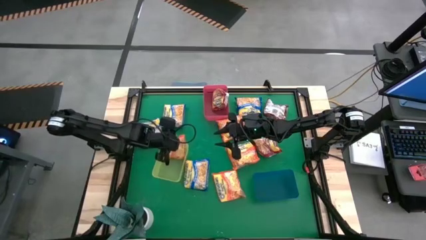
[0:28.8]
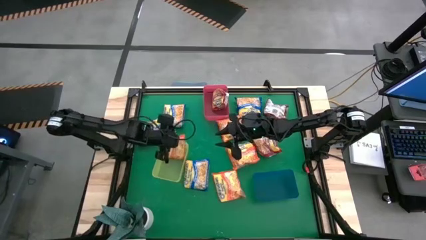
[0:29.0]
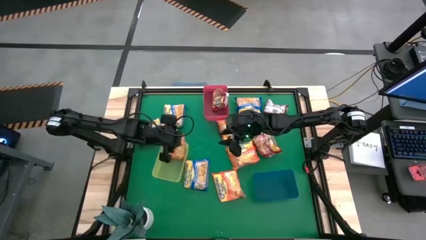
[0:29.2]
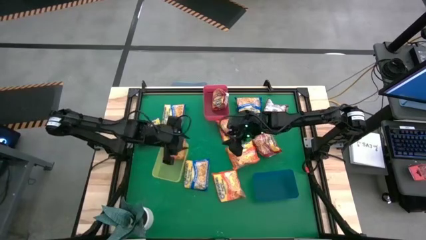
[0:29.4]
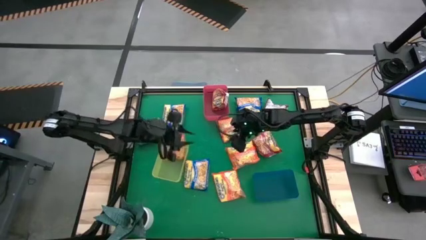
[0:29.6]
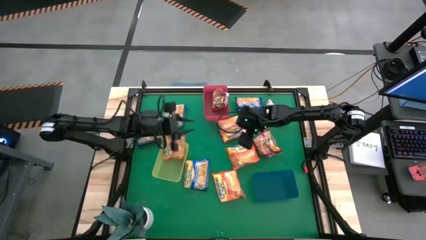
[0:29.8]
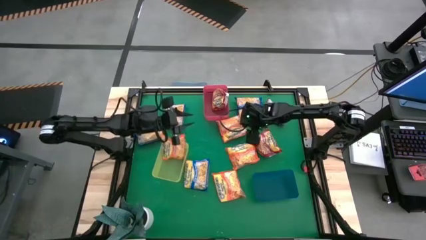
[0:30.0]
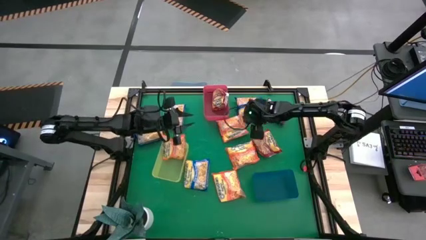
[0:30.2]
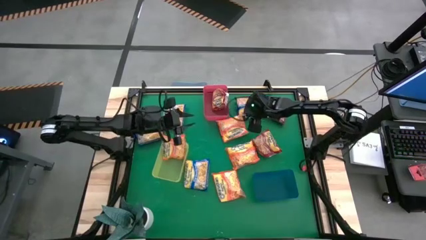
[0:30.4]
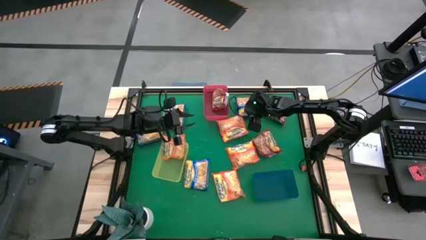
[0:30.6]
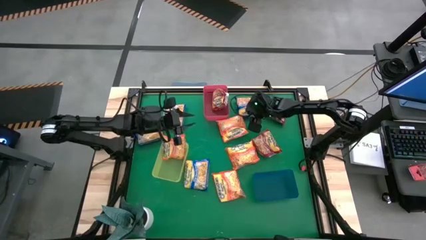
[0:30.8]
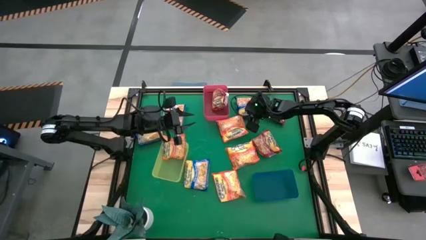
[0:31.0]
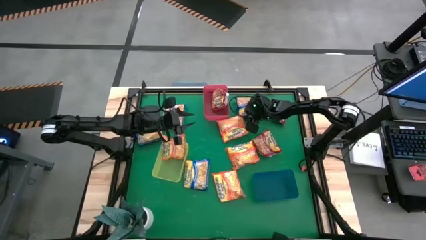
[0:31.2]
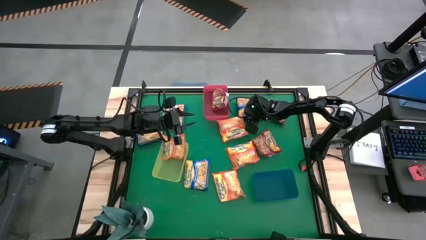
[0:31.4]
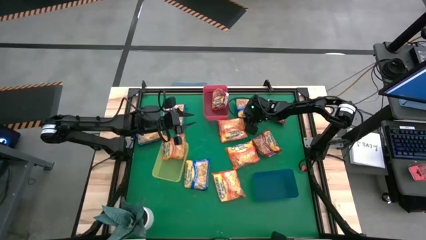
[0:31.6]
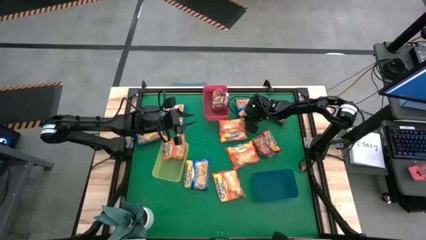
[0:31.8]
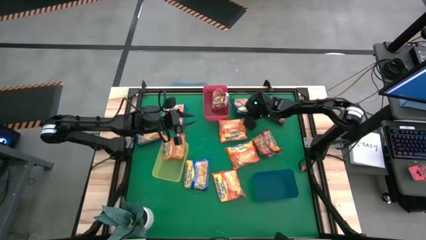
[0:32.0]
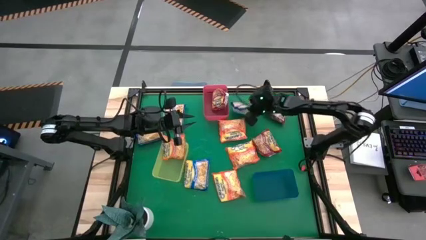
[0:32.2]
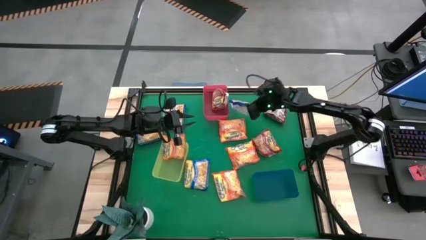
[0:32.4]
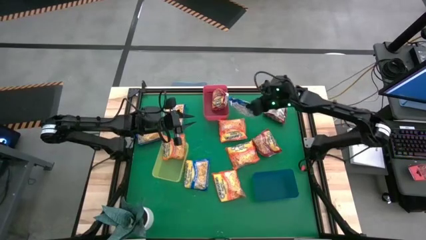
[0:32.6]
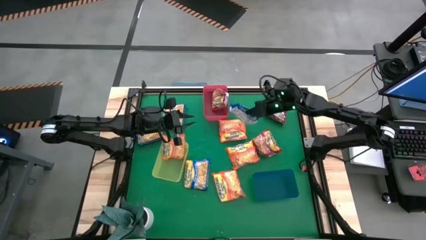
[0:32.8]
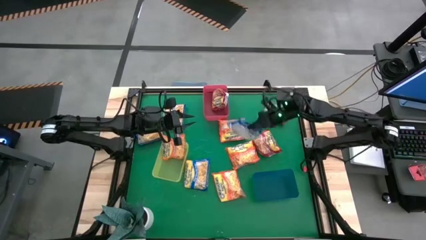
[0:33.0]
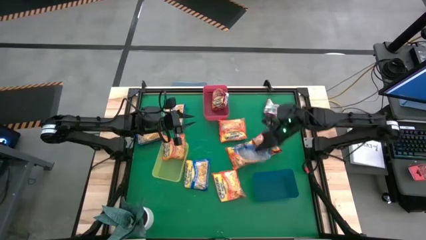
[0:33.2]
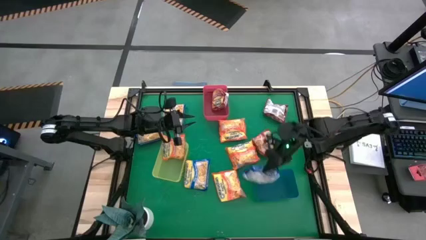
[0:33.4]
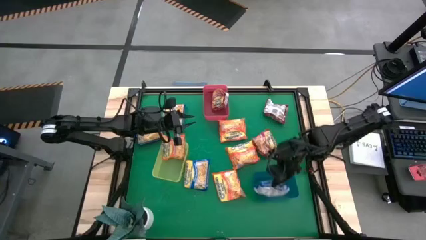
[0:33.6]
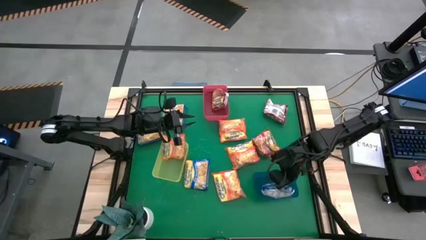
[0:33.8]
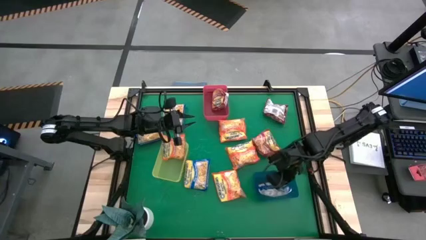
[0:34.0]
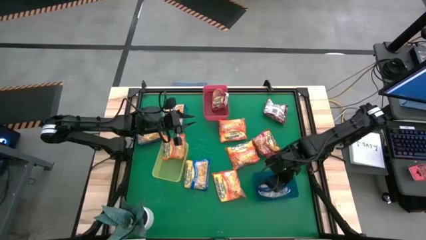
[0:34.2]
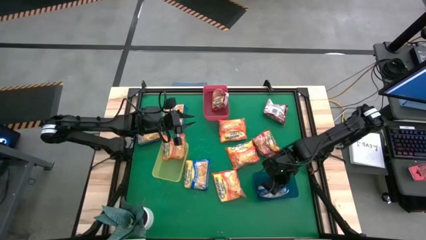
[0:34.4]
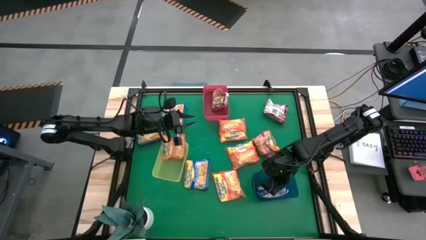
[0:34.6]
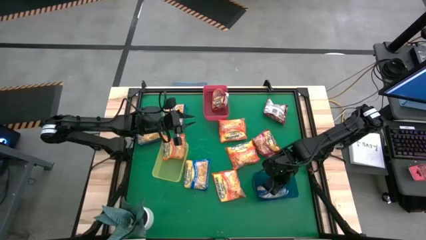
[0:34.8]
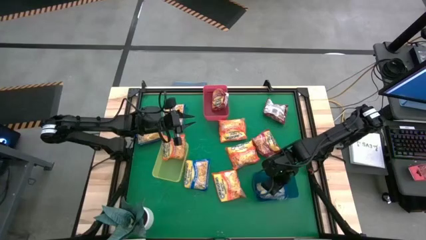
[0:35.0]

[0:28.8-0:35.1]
Task: Sort Maruchan noodles
Put the blue noodle pack into the blue bin

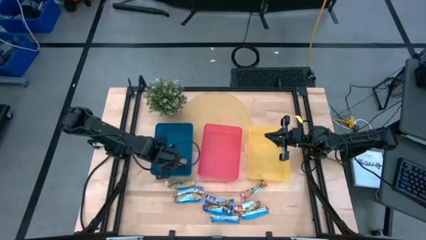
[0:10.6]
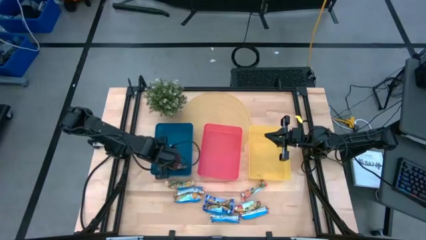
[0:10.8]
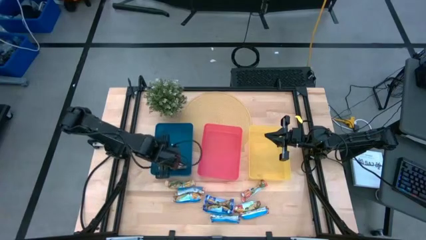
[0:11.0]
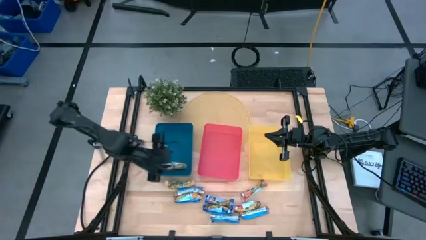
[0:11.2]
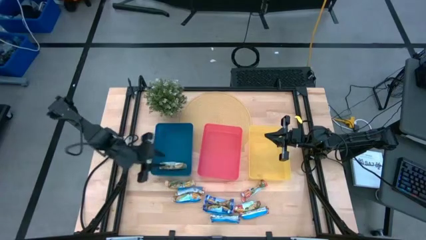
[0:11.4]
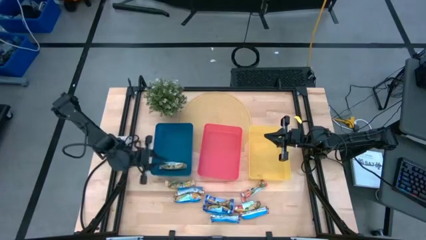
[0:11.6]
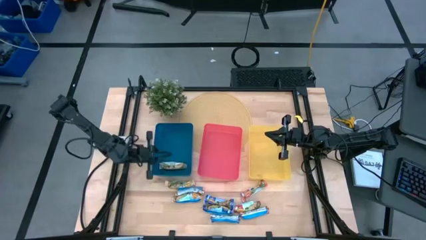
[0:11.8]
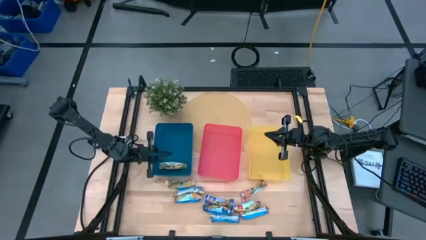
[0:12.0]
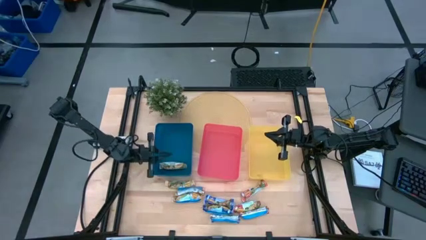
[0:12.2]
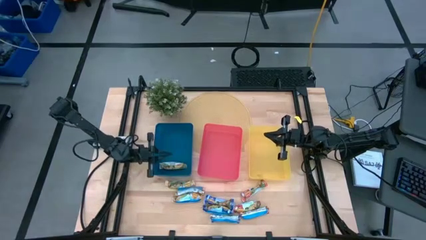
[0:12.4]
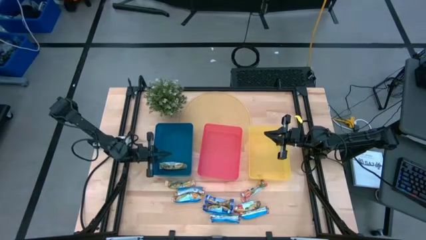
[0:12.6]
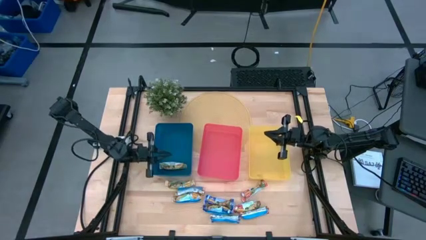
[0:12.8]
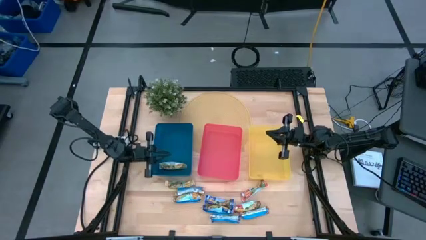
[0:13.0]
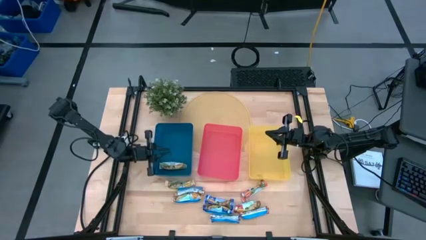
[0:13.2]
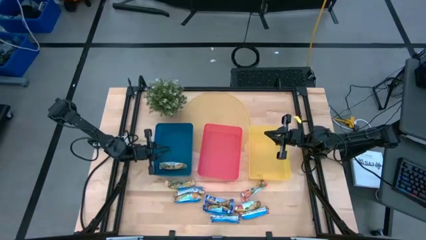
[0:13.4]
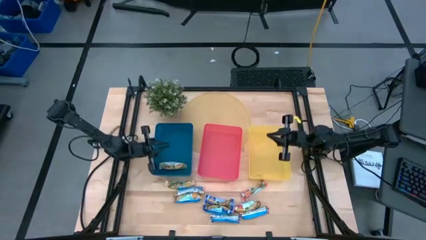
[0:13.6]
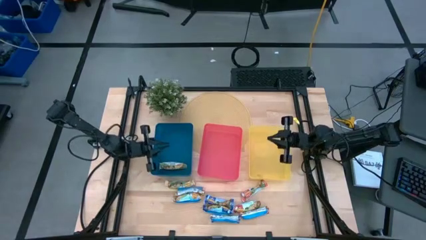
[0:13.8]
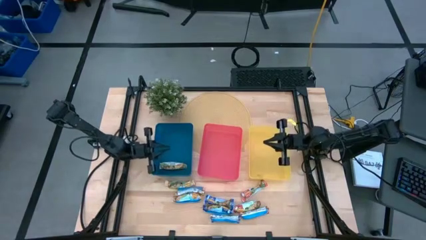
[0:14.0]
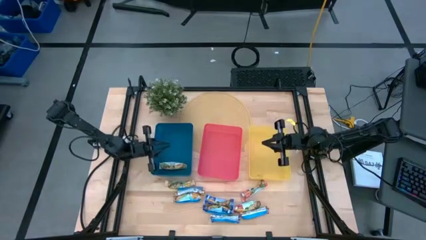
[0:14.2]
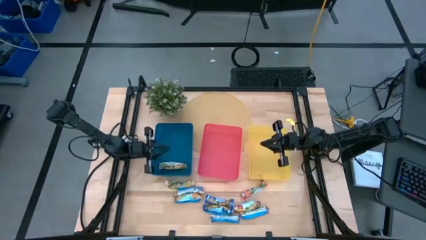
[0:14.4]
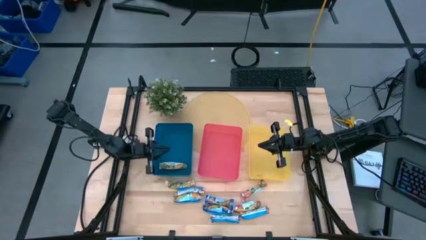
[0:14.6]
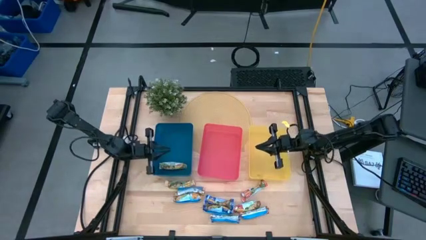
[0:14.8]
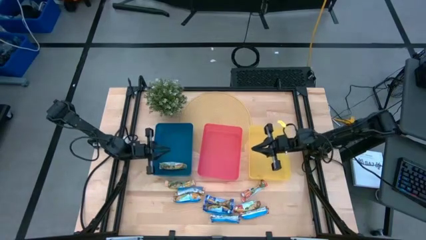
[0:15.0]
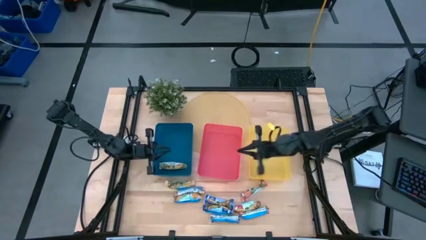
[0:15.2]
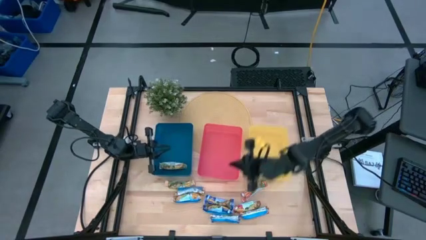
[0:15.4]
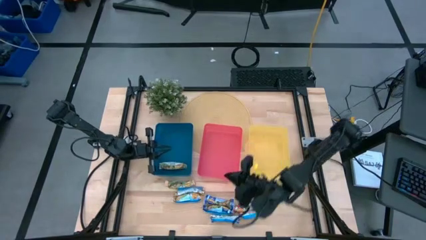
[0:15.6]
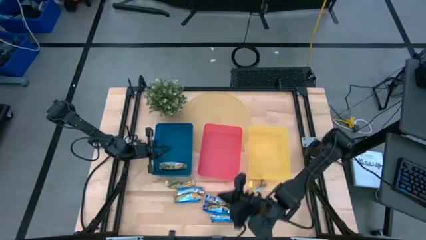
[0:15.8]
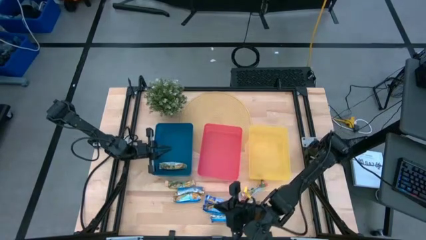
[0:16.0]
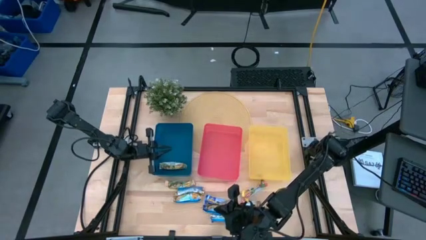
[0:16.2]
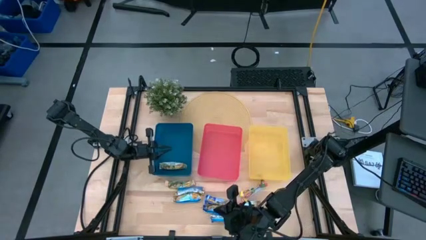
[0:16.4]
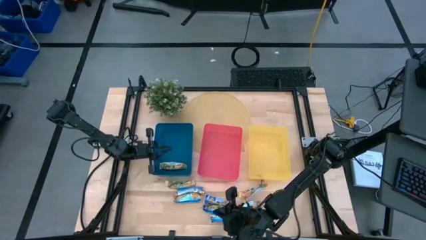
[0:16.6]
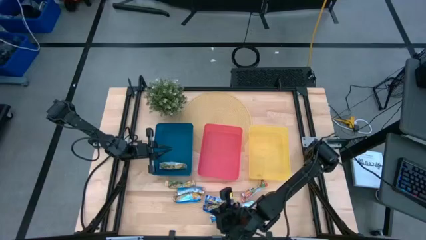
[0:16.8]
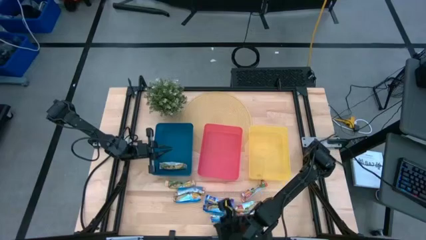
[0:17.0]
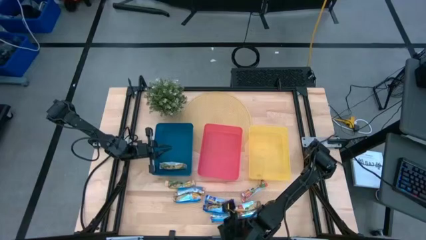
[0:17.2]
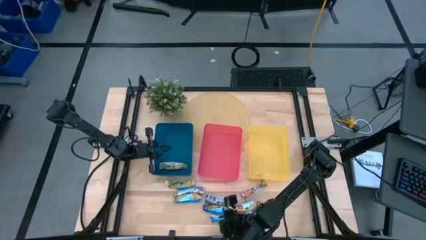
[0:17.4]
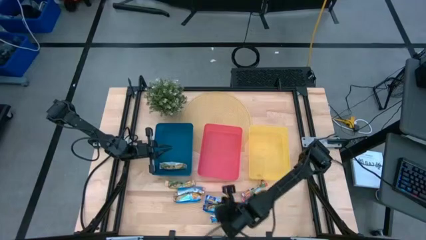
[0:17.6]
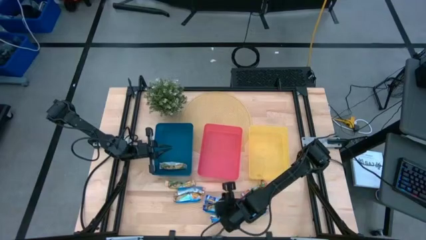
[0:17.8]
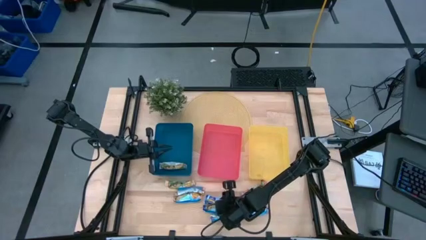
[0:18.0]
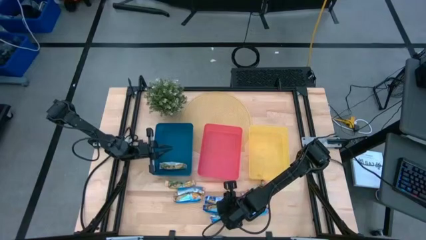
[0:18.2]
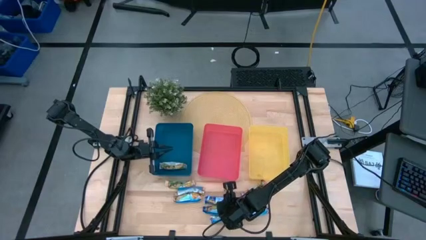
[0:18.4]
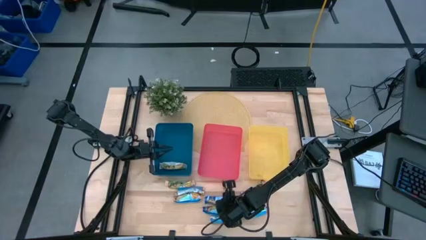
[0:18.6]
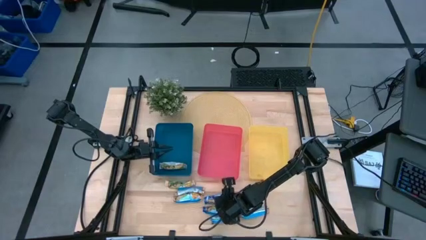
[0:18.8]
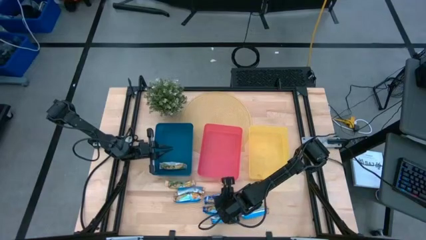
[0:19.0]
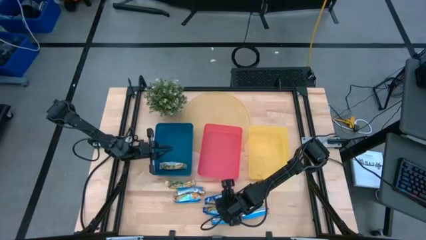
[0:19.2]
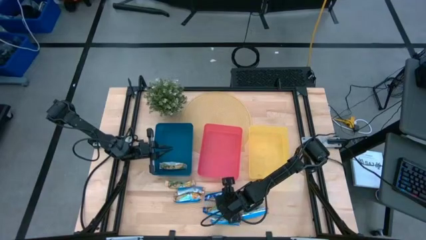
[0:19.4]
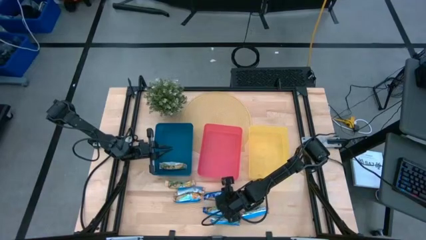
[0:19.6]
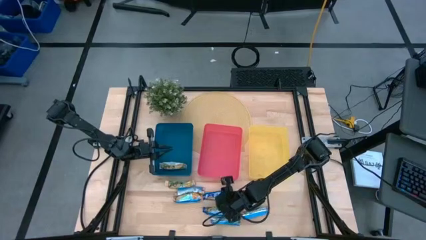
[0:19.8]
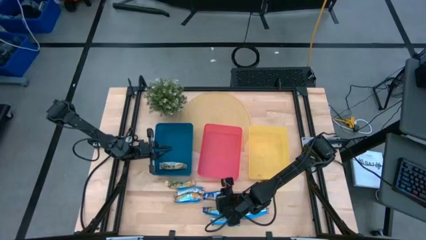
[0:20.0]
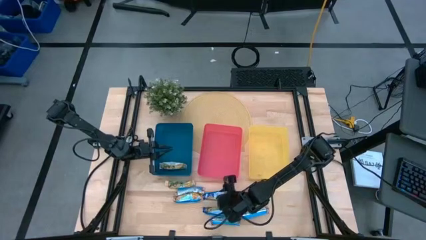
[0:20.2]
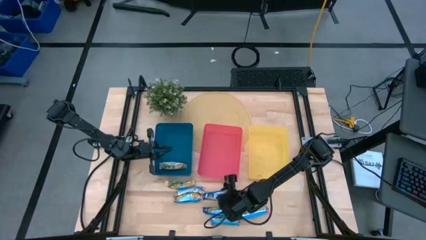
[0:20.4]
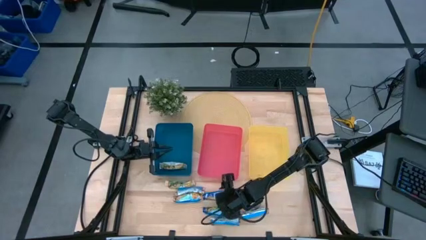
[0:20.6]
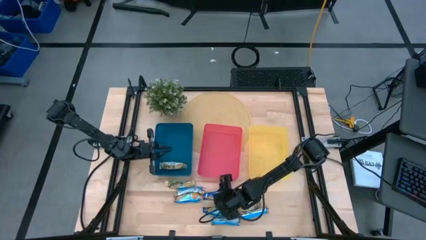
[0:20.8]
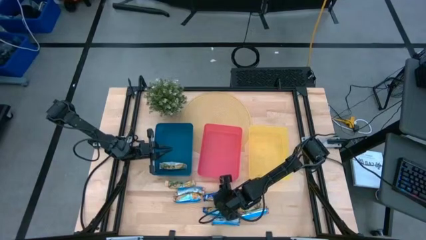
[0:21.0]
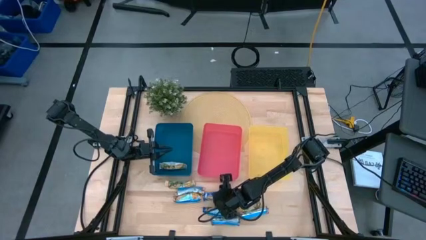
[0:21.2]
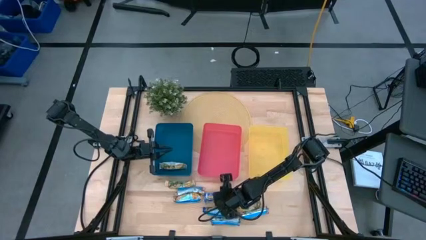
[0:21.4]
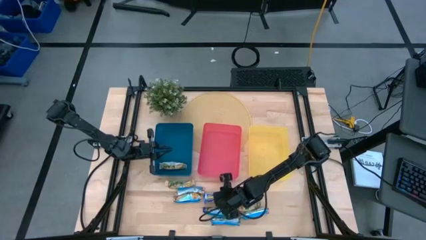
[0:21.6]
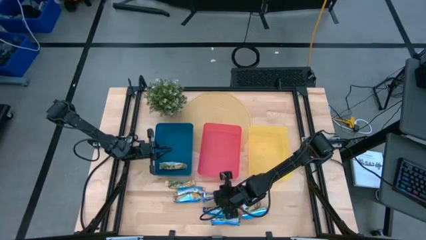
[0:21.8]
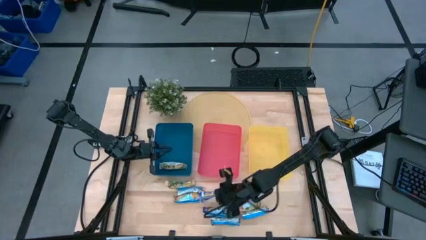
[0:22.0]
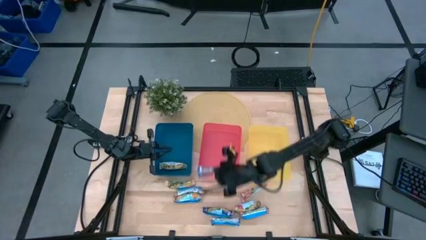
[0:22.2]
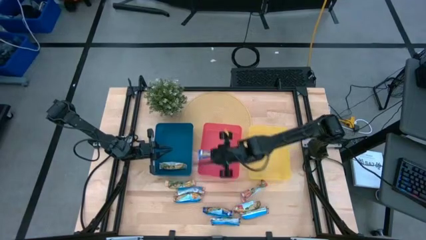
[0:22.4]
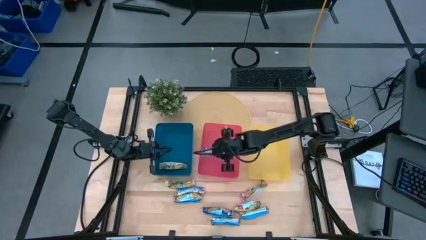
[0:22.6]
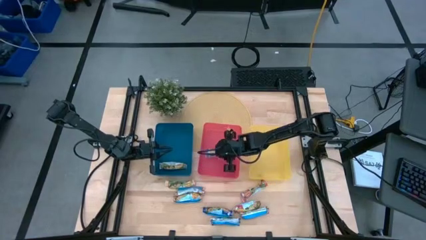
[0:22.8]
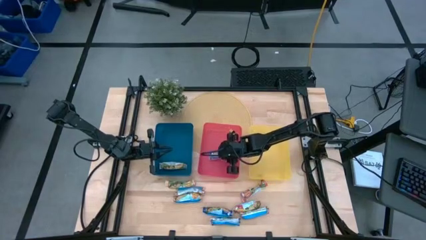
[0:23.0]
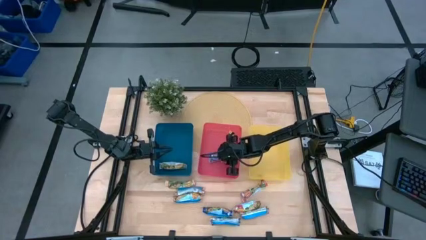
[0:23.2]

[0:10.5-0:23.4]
Task: Pick and place Granola Bars by type
Put the top blue granola bar into the red bin
